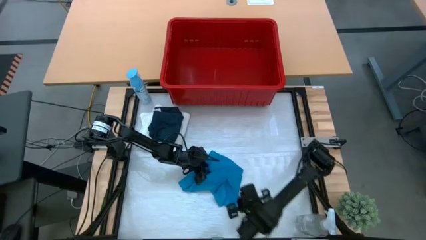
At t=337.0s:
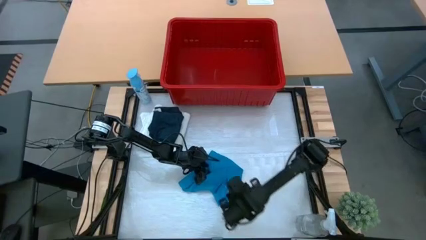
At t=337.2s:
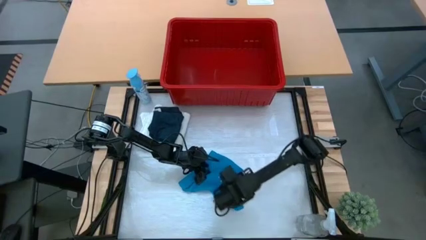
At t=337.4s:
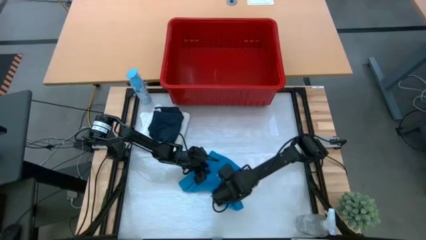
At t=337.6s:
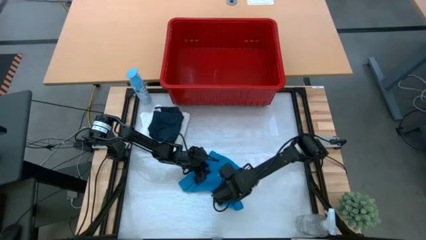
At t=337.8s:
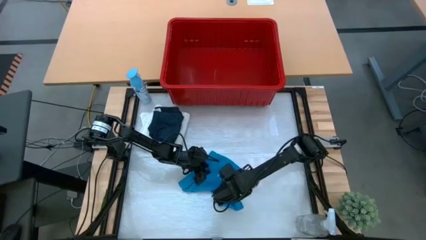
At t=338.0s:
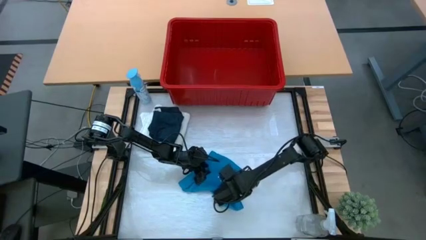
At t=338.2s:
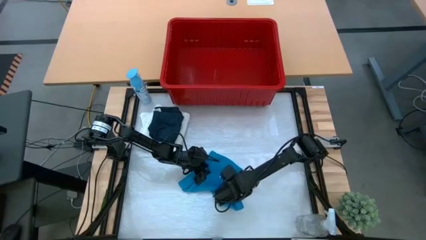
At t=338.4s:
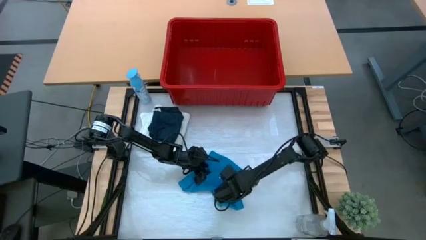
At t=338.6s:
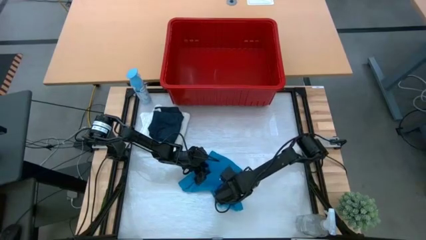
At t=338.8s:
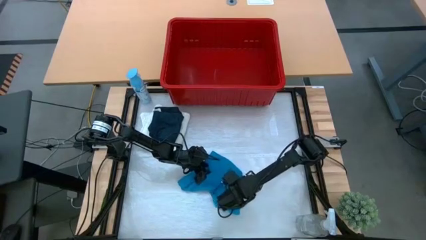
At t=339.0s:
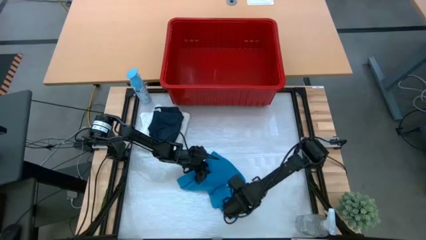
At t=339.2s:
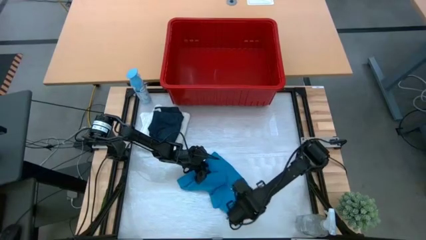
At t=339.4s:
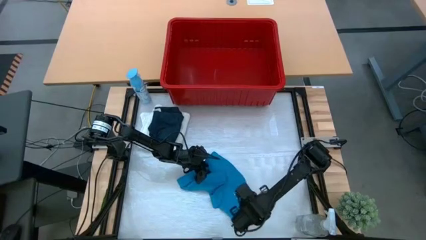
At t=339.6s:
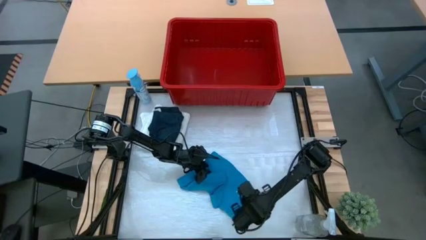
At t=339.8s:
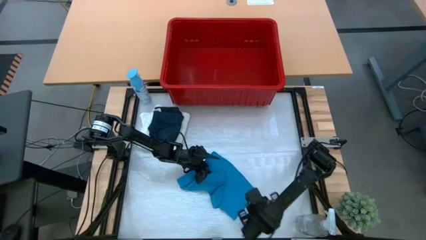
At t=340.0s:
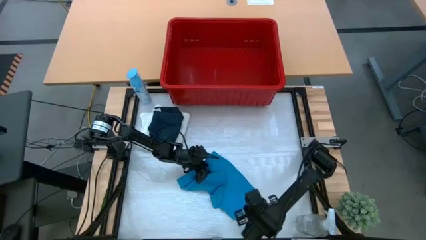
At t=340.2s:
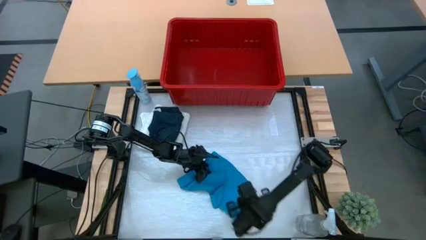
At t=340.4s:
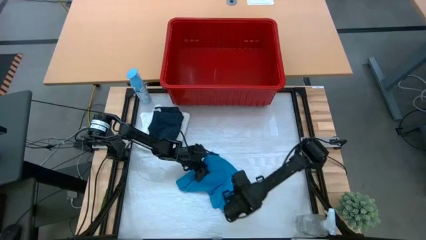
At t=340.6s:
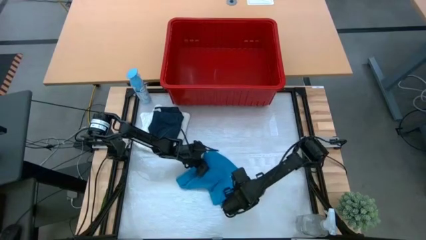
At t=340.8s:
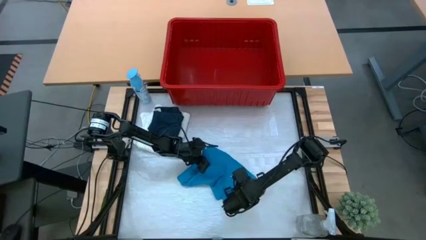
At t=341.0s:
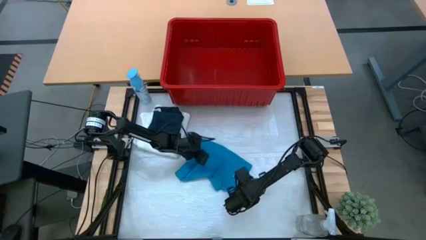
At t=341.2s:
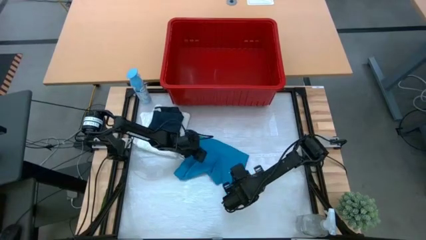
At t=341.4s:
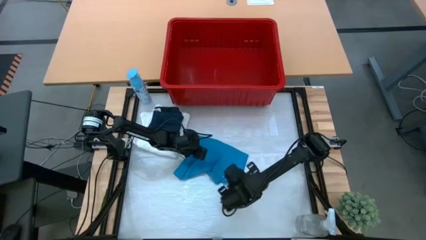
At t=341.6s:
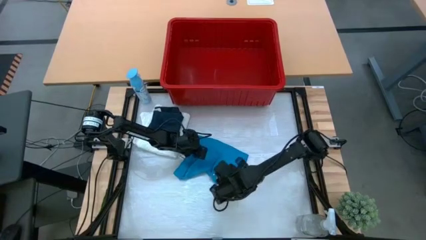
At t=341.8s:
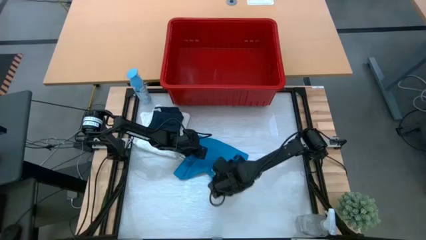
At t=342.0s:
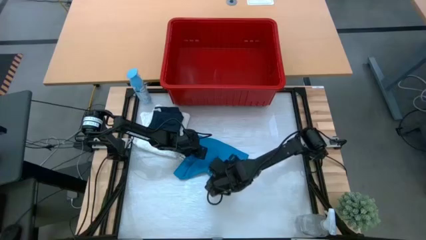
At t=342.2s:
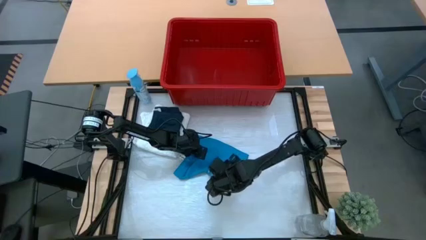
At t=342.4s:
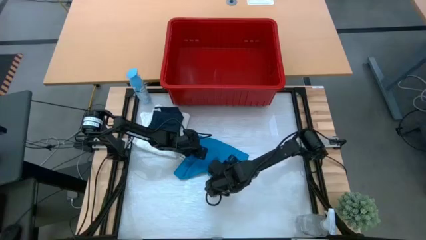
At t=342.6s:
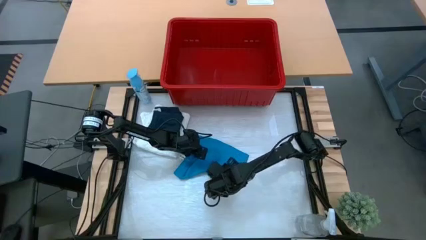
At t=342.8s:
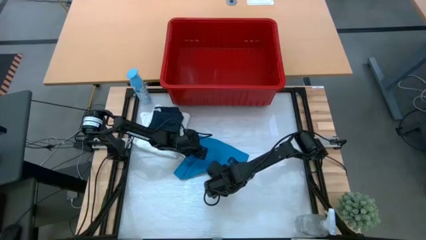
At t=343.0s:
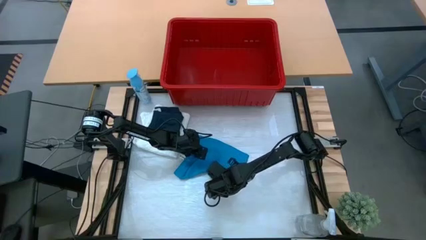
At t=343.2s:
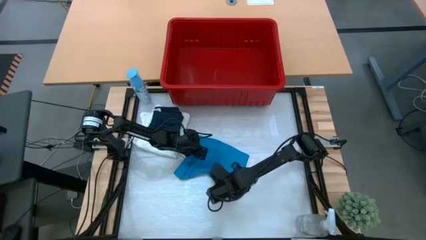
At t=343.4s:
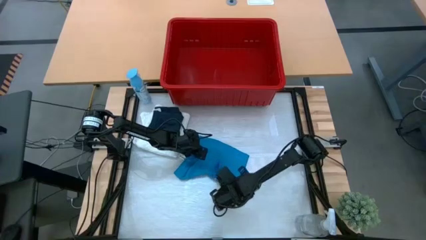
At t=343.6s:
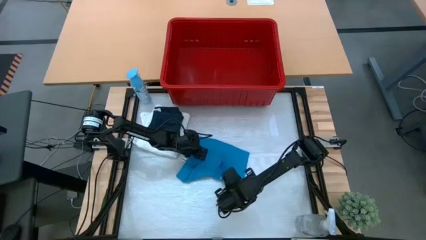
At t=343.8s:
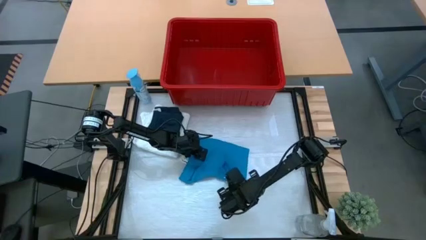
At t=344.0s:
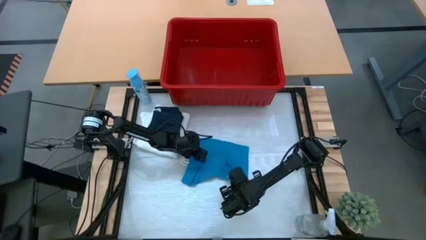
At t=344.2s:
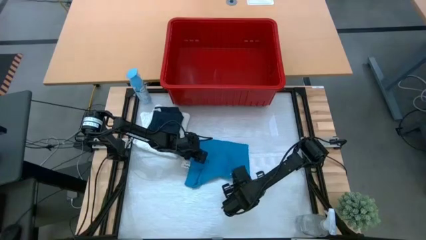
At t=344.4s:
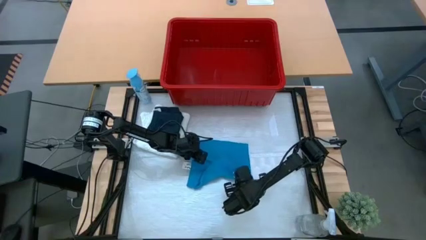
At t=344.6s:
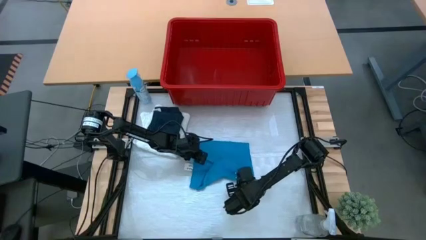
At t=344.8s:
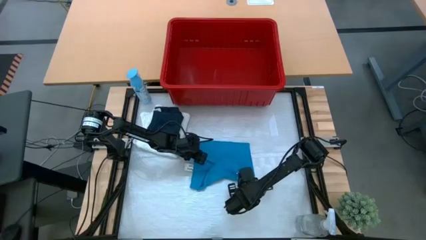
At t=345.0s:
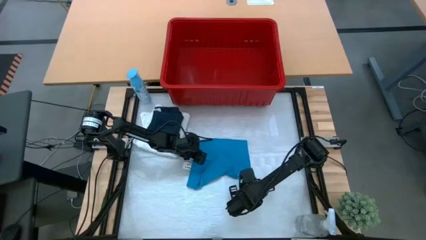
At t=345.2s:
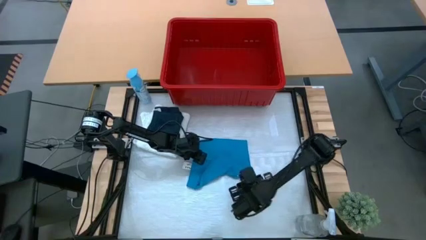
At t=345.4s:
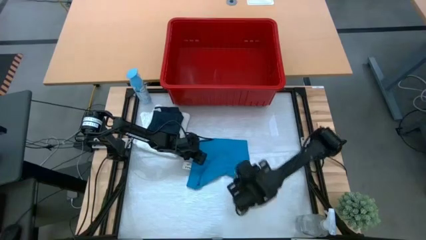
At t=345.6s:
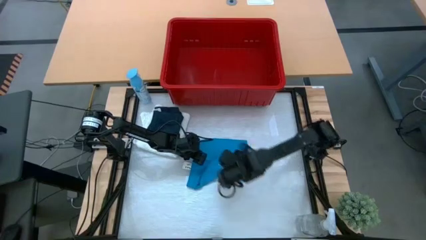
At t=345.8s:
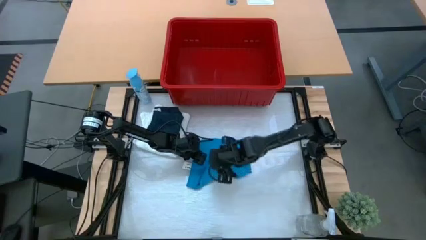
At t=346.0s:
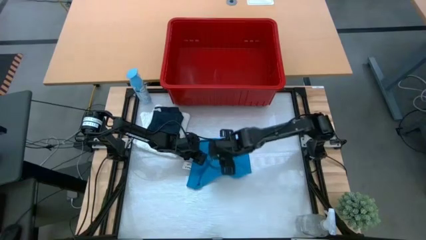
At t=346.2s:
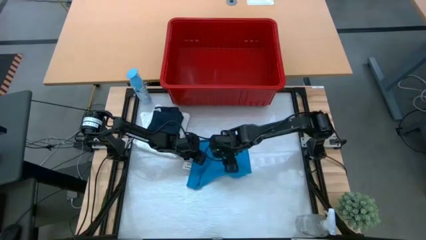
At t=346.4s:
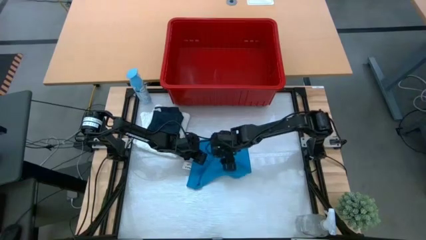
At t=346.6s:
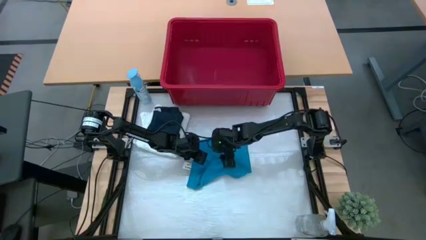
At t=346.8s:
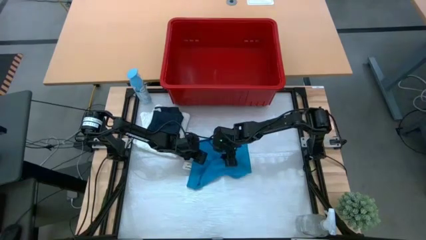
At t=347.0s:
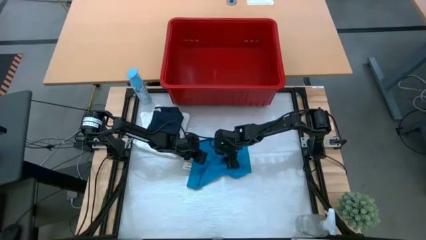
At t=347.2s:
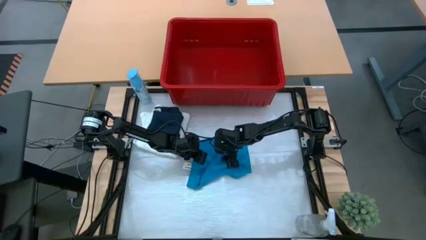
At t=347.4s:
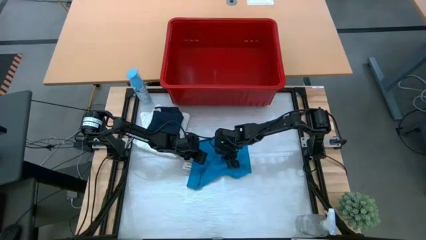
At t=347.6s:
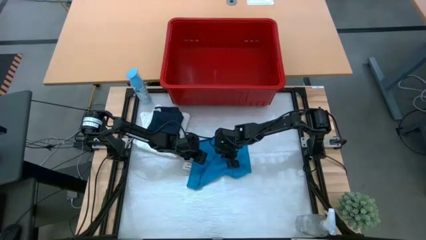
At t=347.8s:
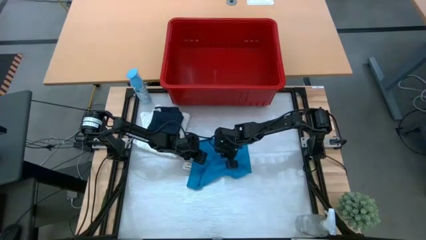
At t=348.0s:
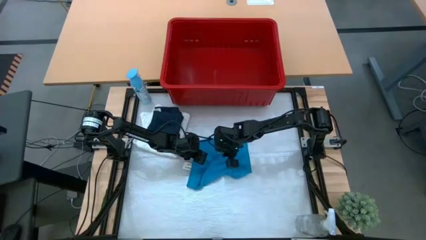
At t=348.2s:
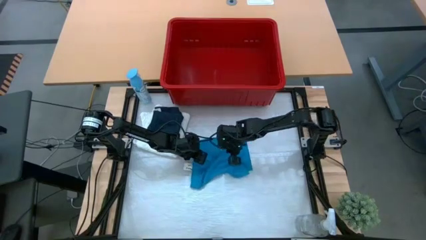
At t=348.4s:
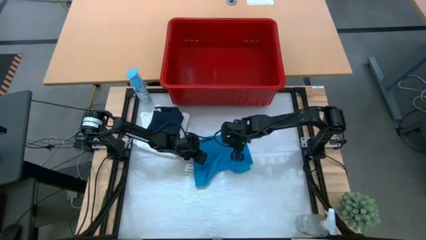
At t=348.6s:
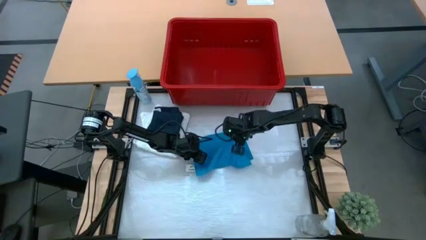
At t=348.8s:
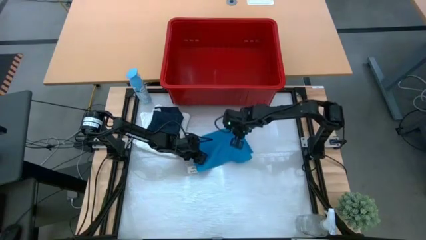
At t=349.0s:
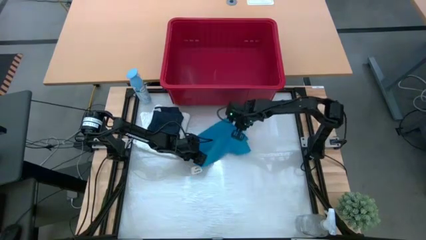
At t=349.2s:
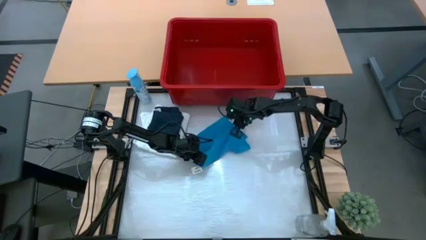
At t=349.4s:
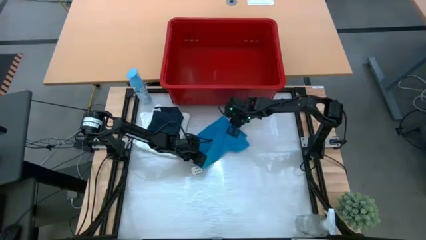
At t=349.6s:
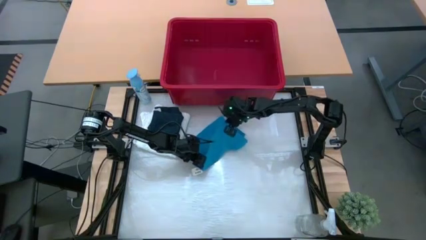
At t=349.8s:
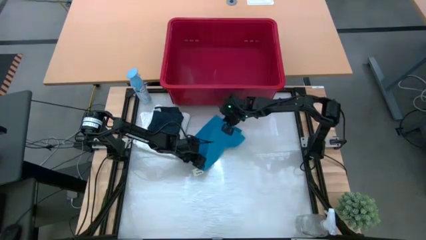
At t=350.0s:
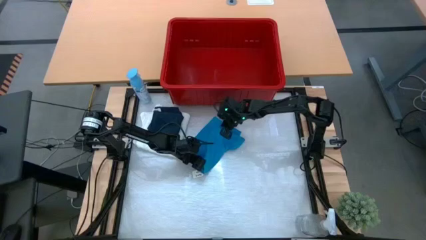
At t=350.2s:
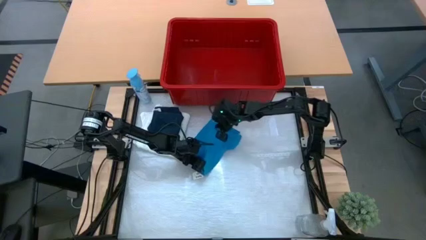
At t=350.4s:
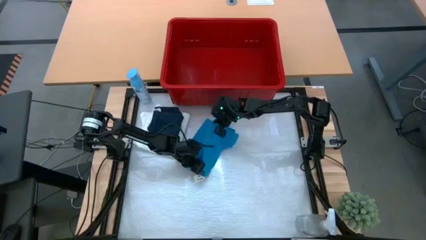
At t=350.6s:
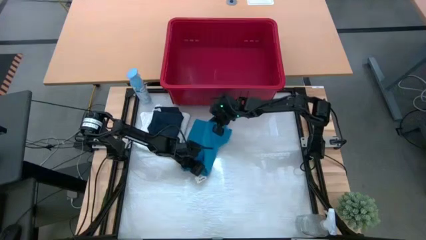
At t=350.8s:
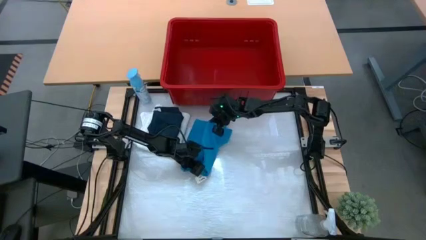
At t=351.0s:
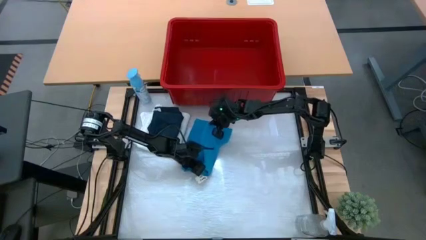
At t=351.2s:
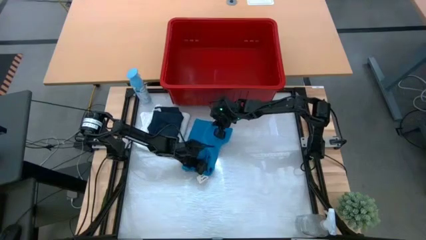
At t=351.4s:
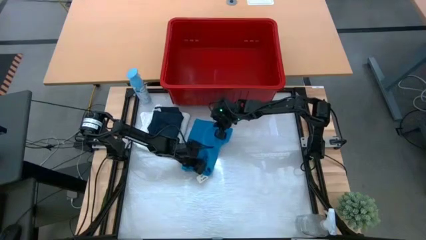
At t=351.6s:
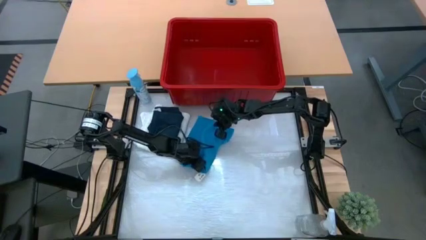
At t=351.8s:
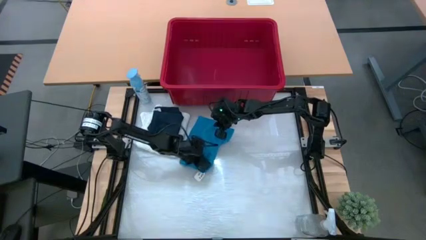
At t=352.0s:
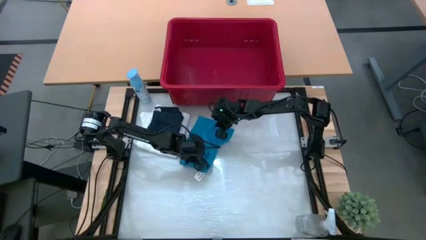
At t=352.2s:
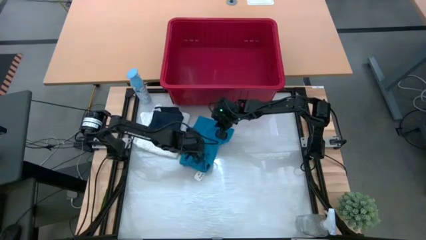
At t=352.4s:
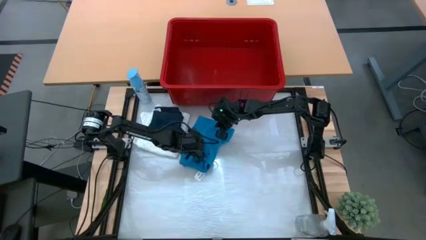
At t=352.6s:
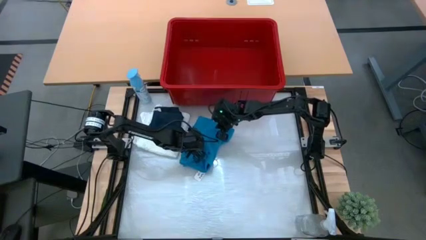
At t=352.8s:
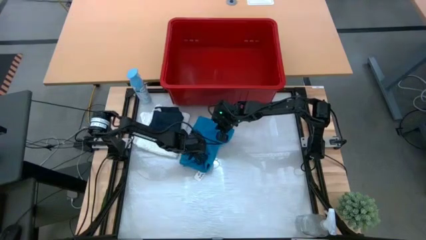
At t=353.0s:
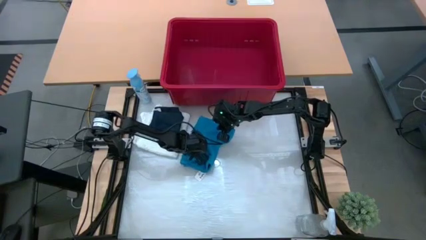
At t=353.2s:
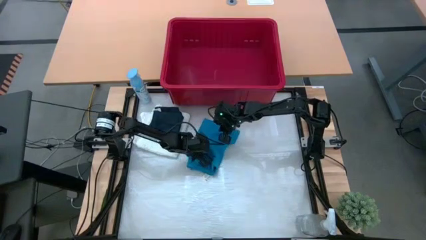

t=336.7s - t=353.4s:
Task: Fold Laundry from Bin
Fold the blue shorts
